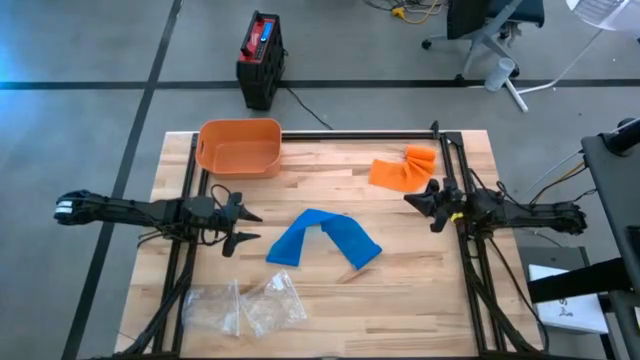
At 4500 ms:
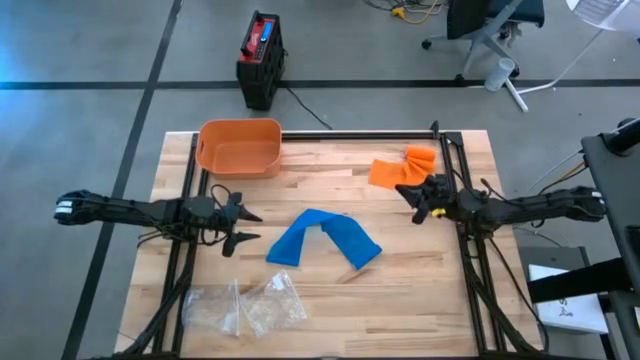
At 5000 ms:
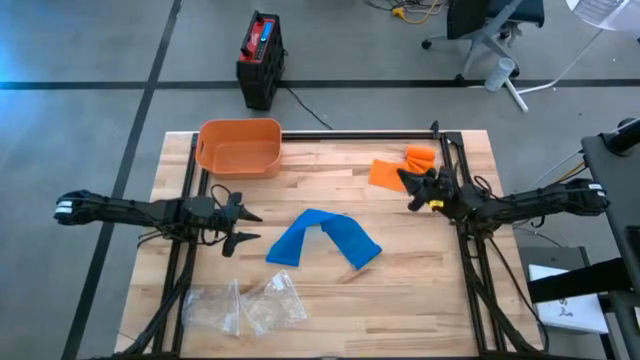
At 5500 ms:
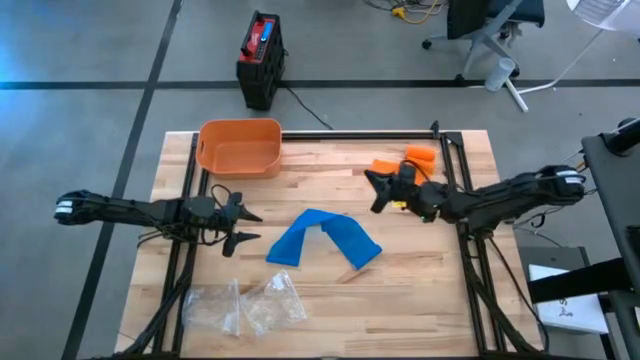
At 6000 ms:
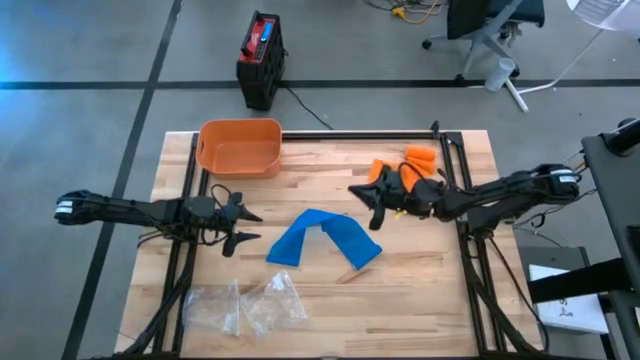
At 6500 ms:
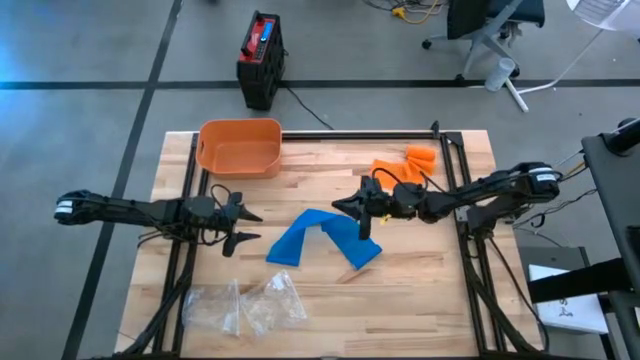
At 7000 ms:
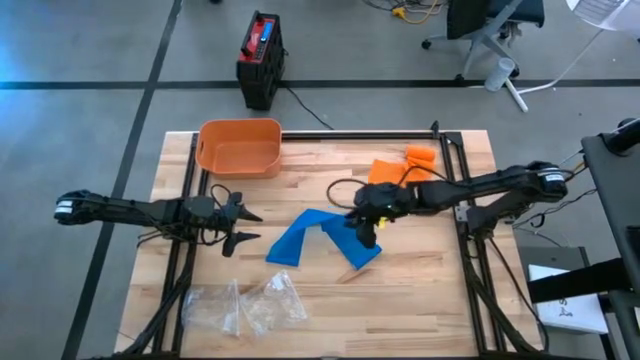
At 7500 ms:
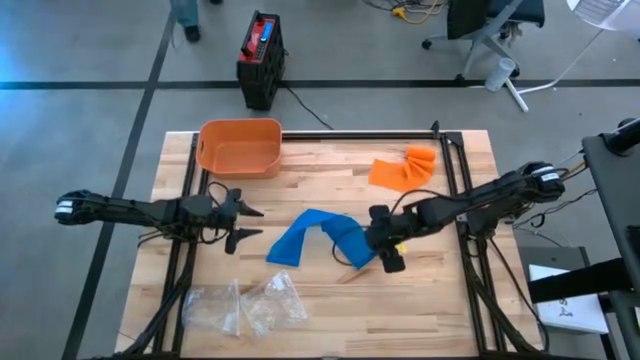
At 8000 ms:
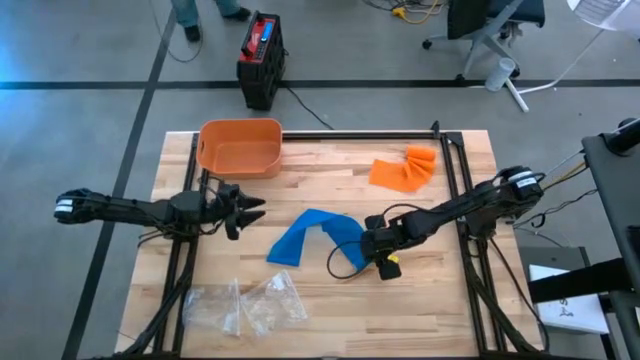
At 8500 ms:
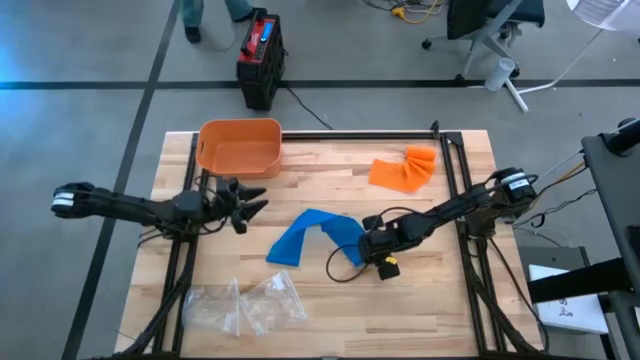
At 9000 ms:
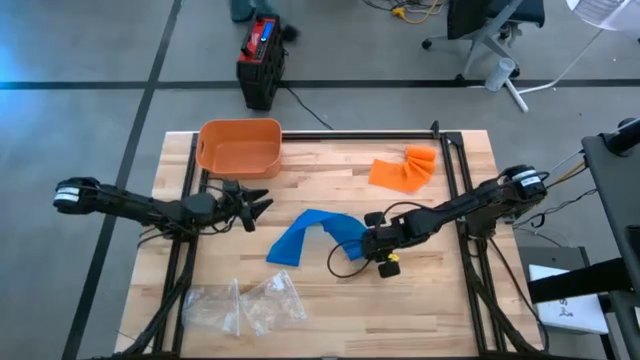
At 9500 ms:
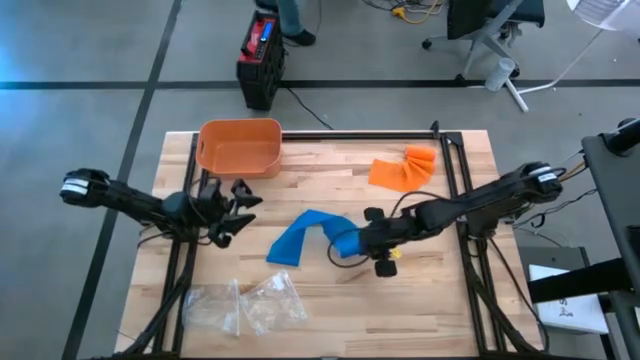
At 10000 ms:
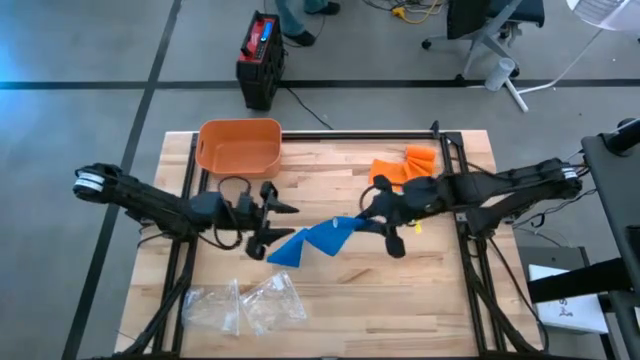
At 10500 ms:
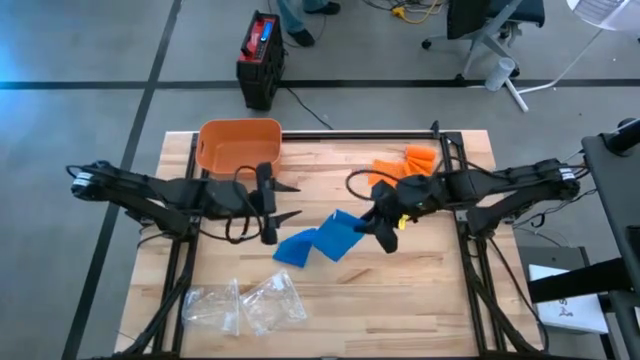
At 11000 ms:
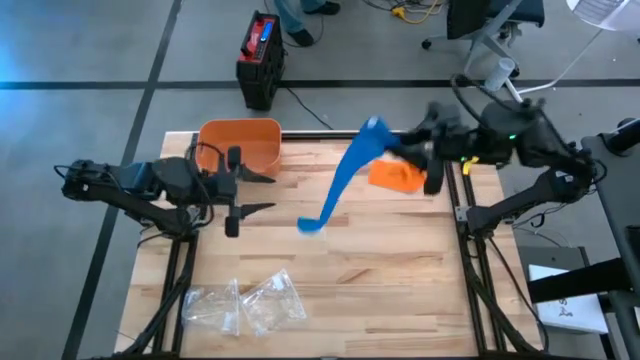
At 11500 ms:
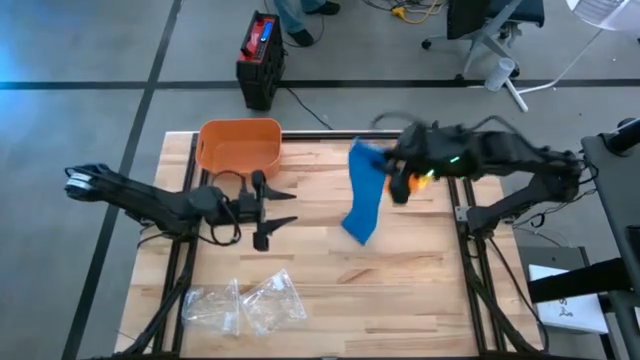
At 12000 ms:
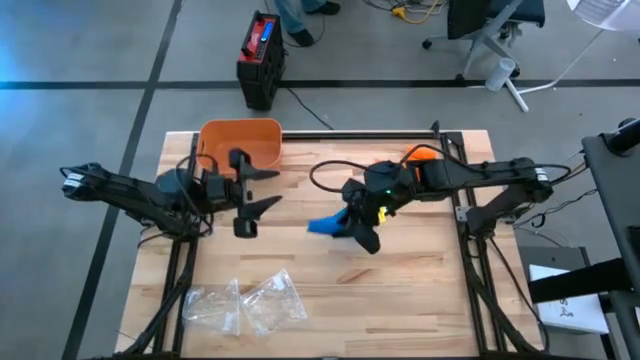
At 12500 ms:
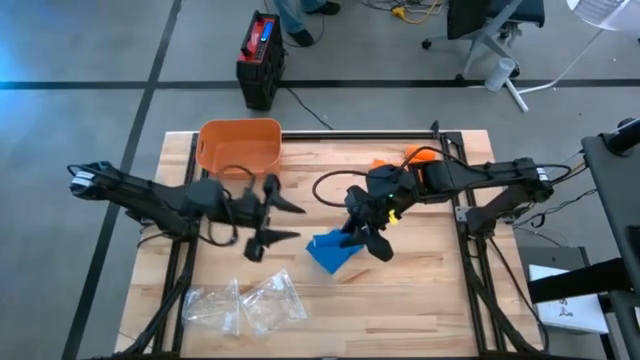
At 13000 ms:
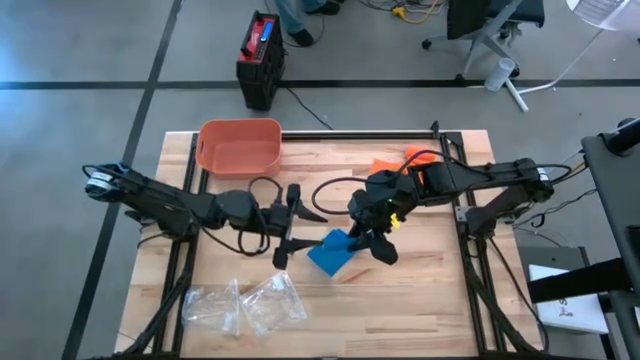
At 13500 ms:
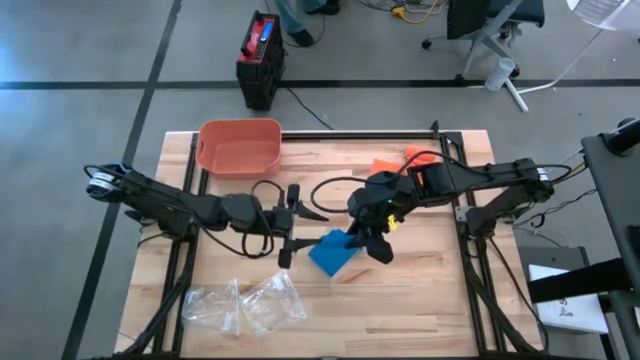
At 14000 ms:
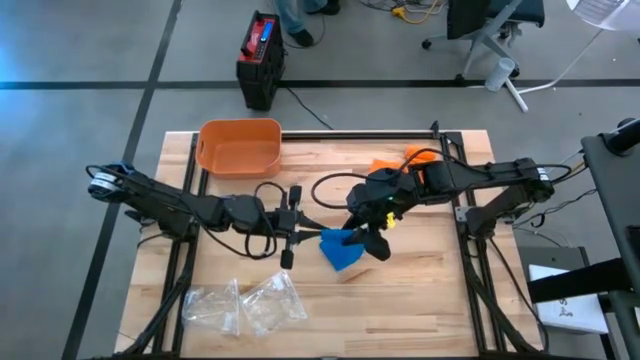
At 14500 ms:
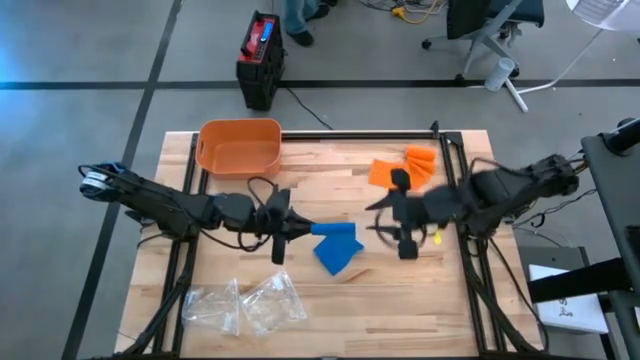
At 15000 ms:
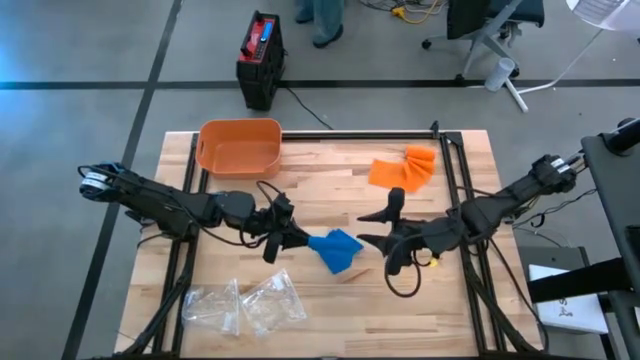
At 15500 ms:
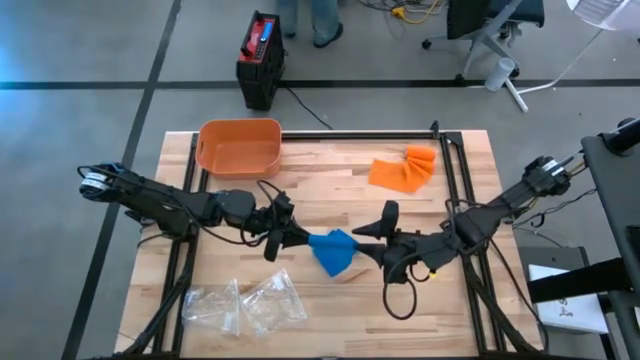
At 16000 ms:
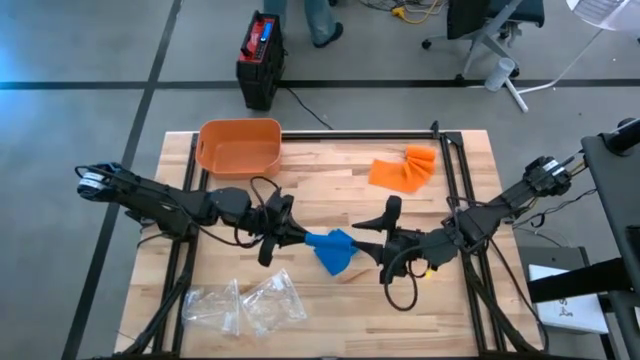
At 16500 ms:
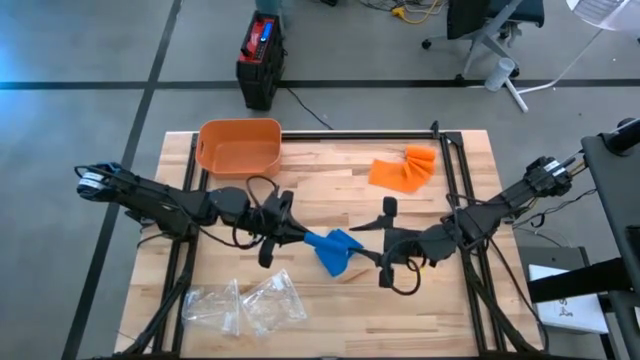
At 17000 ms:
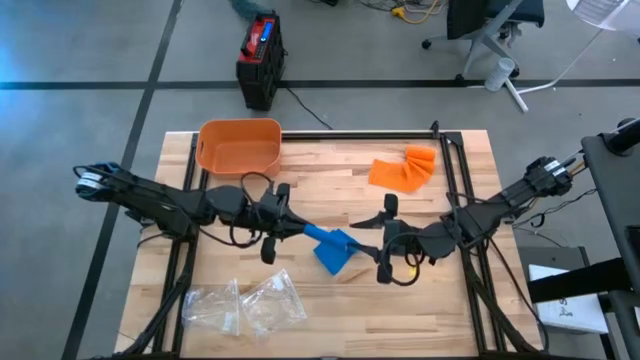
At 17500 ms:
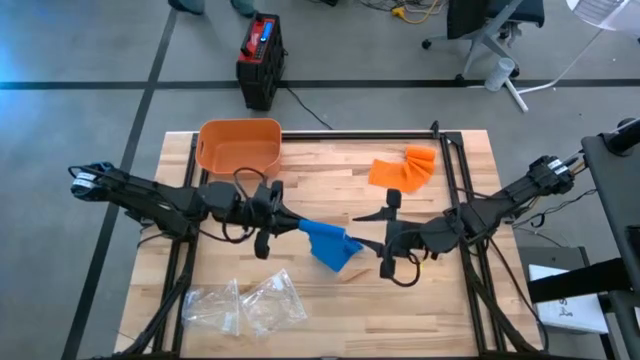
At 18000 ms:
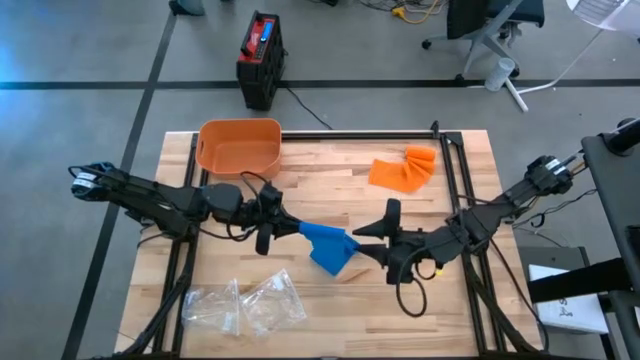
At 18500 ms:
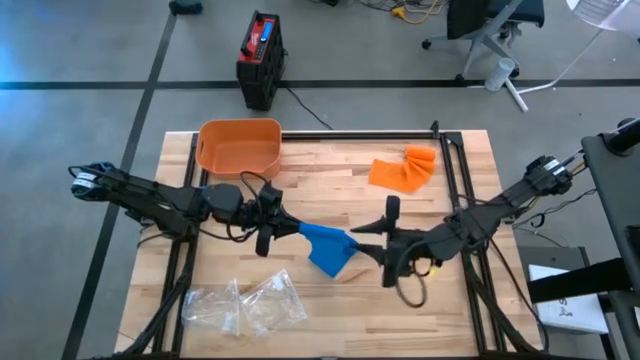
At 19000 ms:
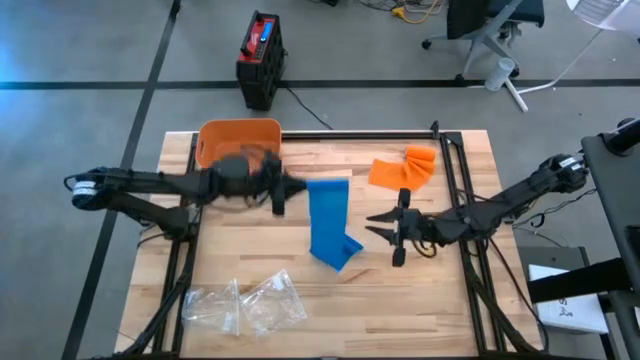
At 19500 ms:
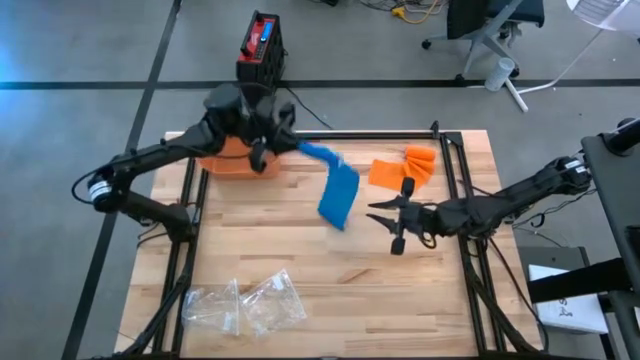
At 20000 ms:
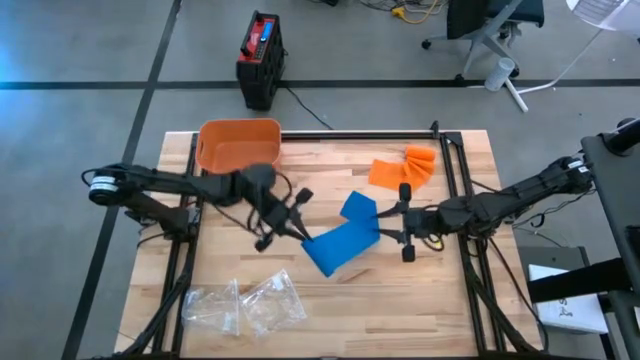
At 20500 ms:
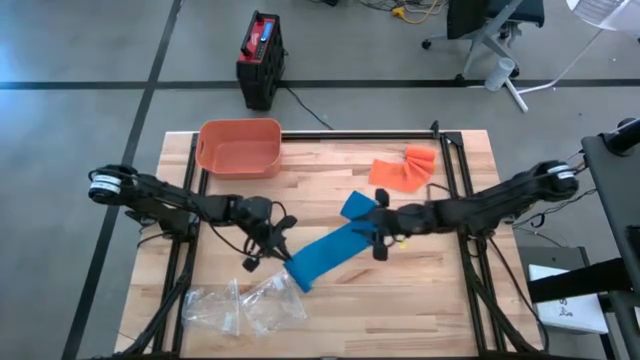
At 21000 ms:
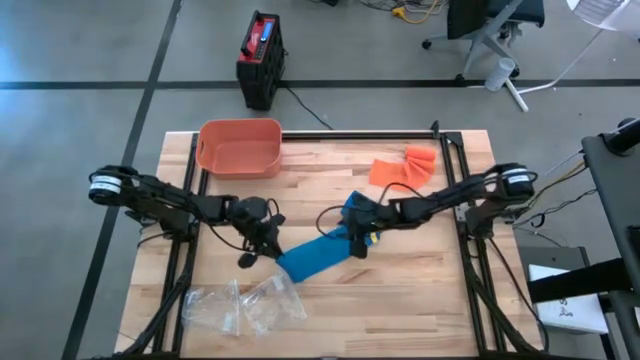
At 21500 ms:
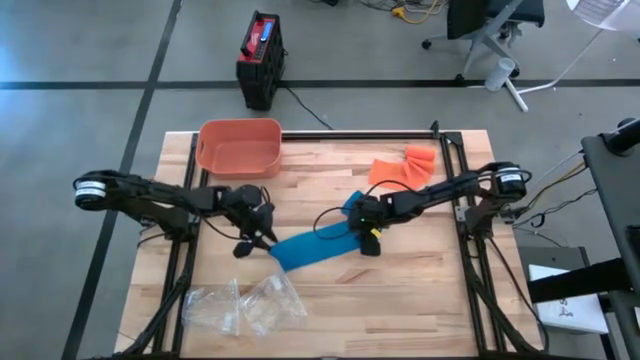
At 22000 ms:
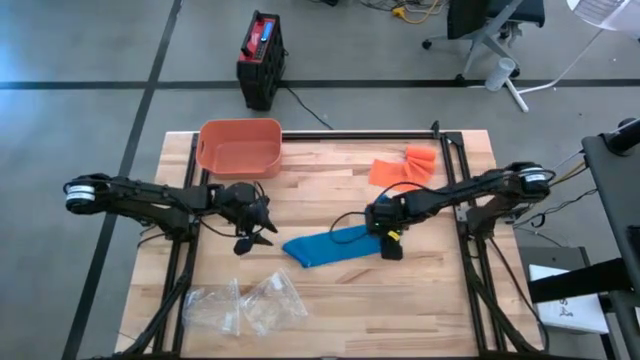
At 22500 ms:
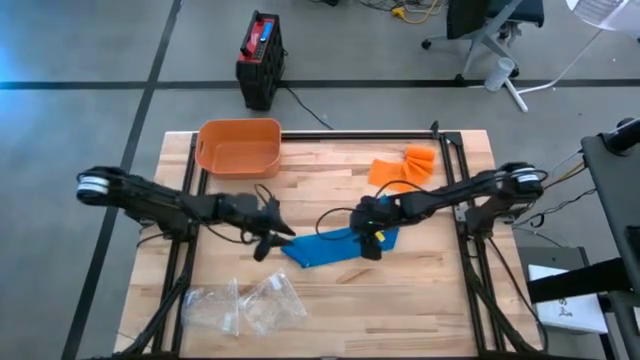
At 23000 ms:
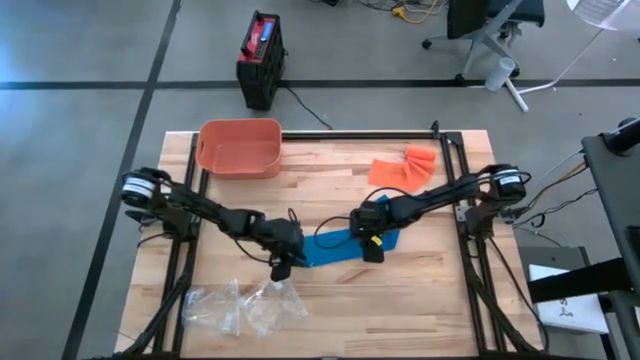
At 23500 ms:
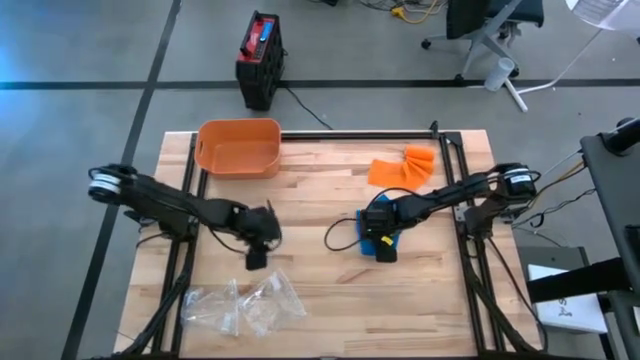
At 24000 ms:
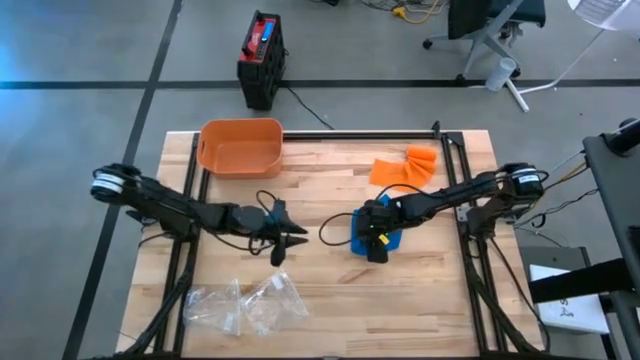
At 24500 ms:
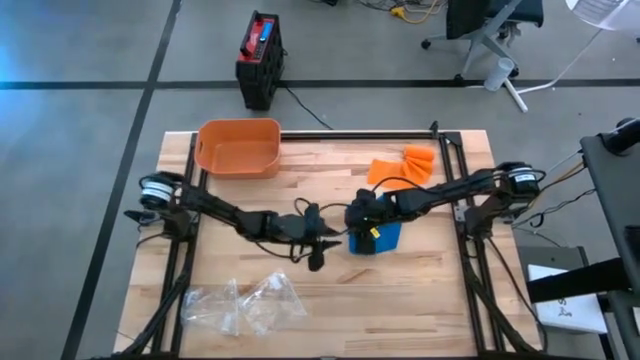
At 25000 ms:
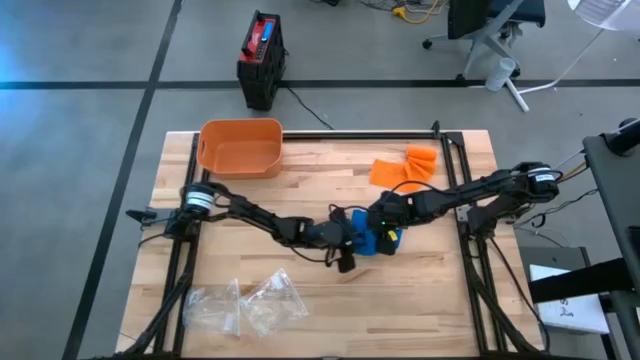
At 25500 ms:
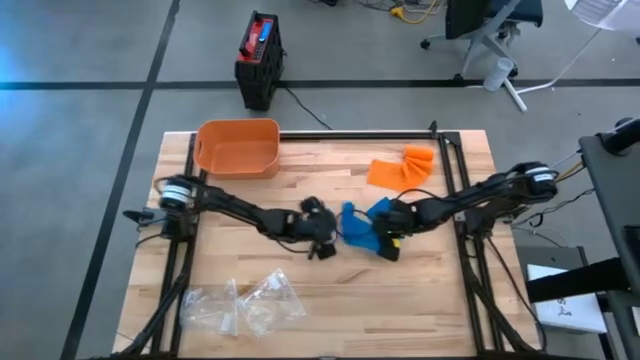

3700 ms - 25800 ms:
Task: Roll bandage
Roll the blue bandage
